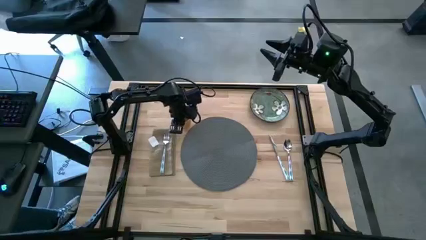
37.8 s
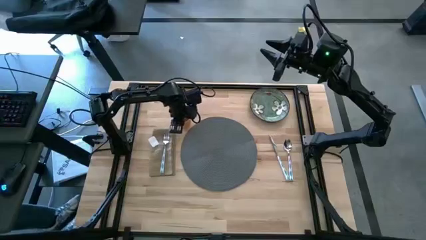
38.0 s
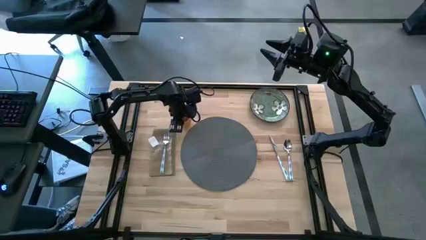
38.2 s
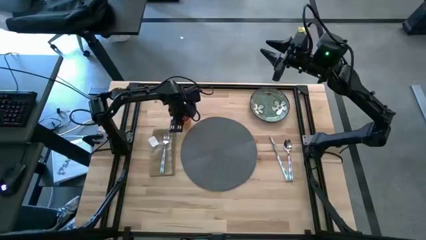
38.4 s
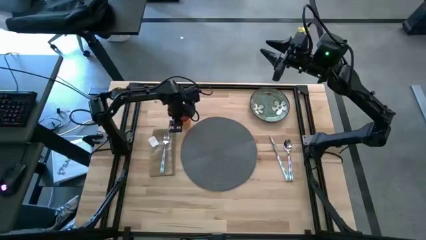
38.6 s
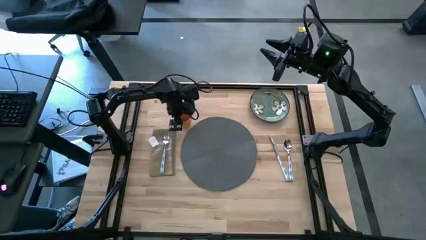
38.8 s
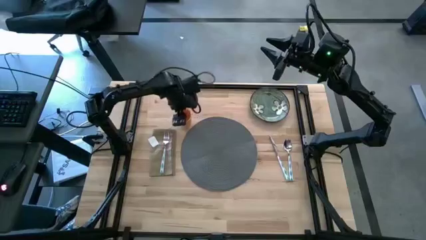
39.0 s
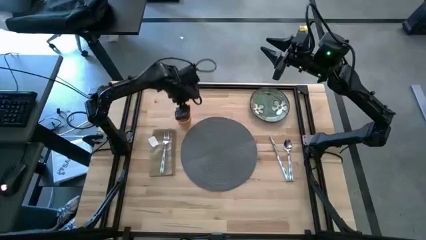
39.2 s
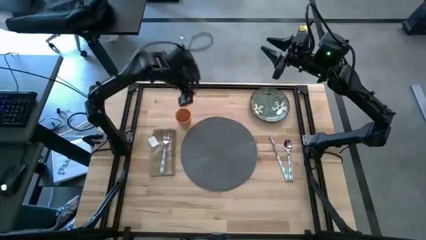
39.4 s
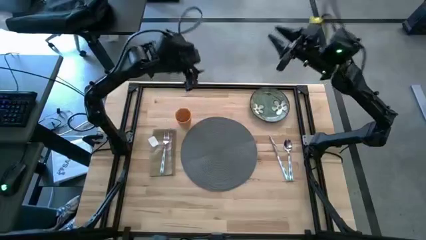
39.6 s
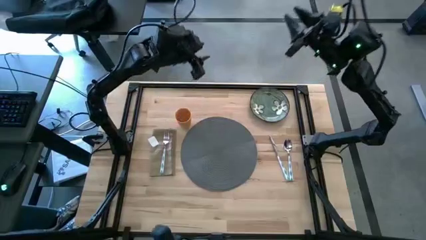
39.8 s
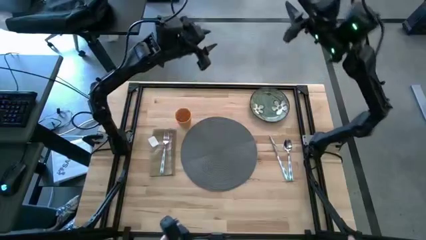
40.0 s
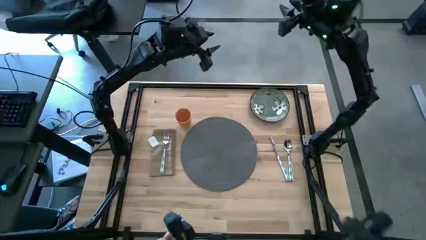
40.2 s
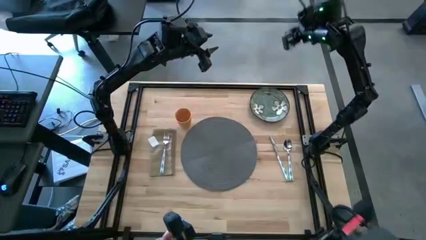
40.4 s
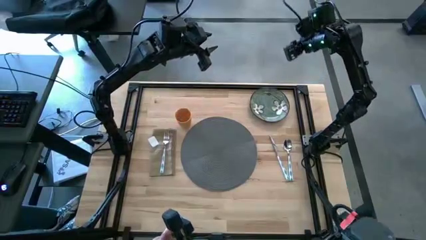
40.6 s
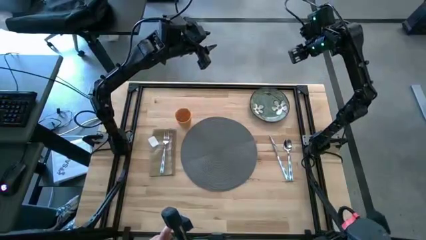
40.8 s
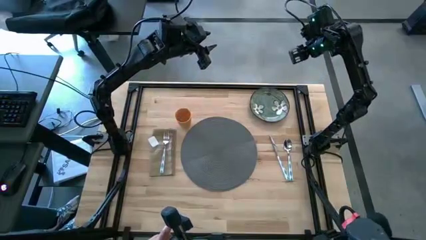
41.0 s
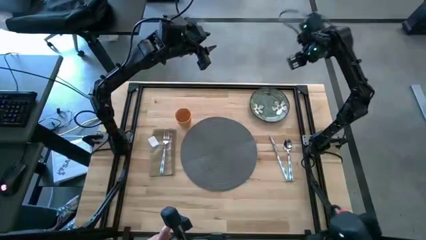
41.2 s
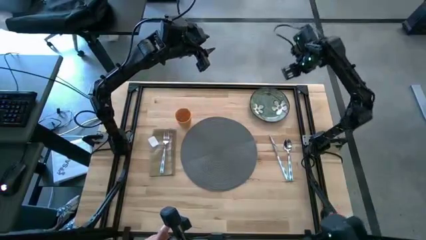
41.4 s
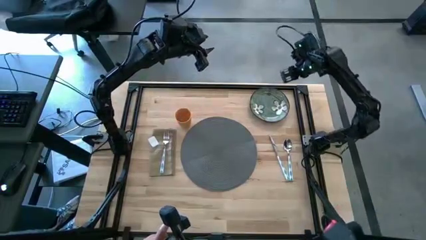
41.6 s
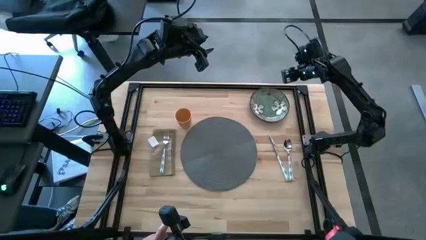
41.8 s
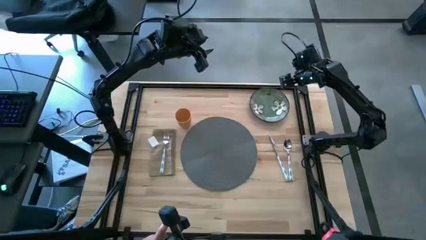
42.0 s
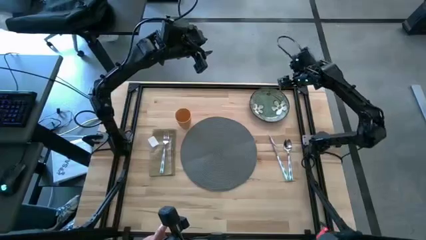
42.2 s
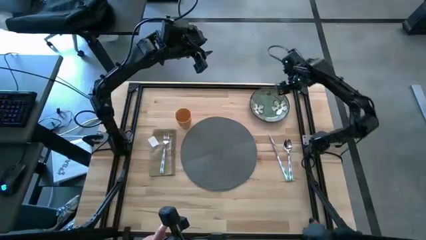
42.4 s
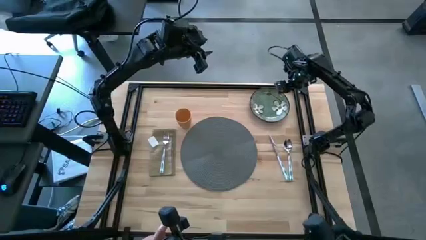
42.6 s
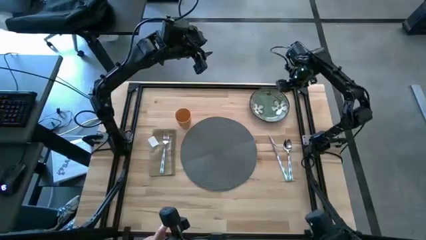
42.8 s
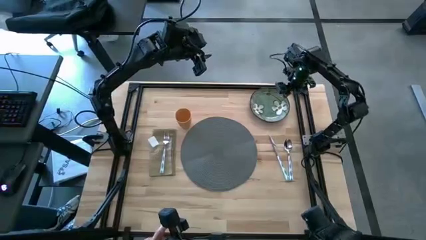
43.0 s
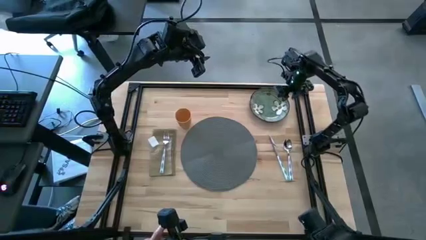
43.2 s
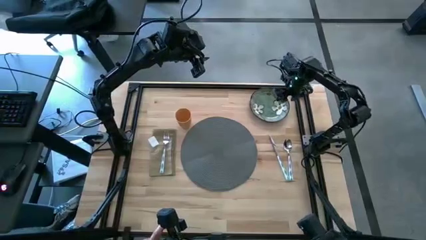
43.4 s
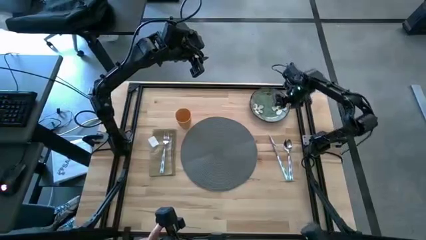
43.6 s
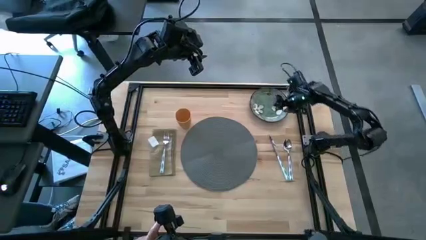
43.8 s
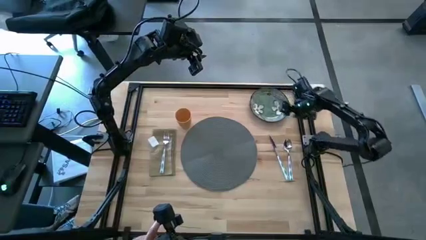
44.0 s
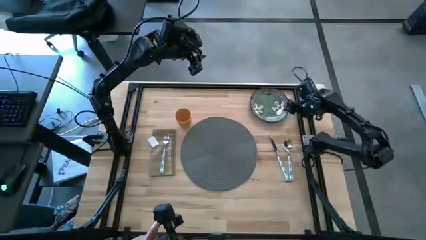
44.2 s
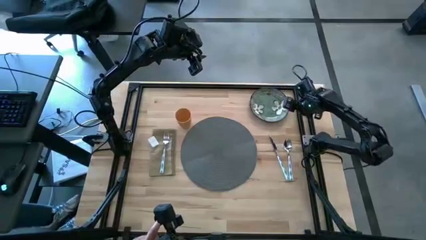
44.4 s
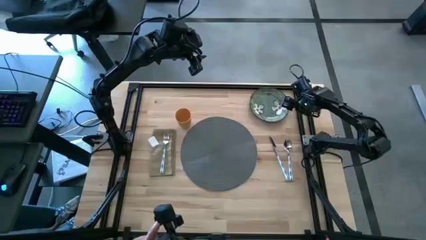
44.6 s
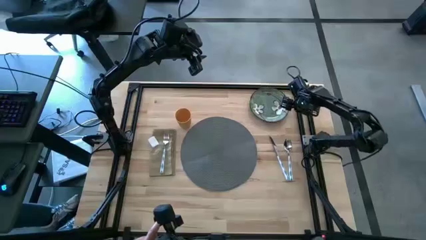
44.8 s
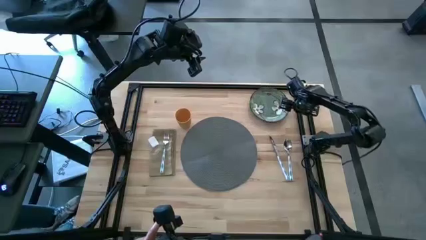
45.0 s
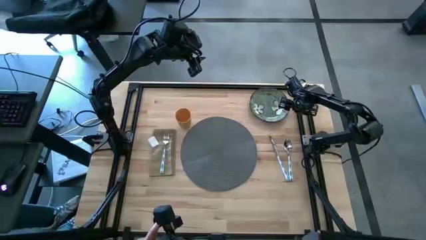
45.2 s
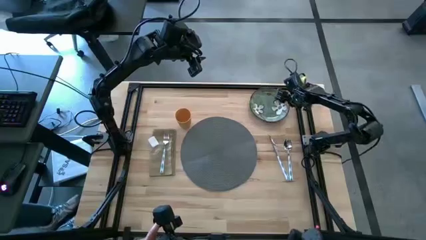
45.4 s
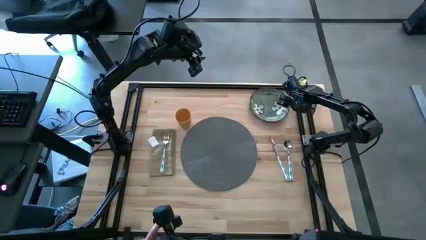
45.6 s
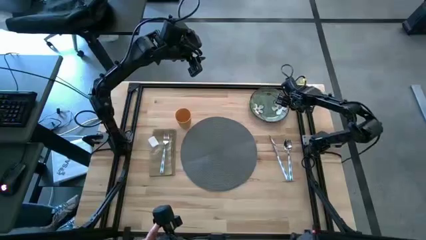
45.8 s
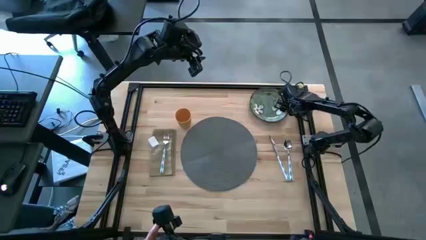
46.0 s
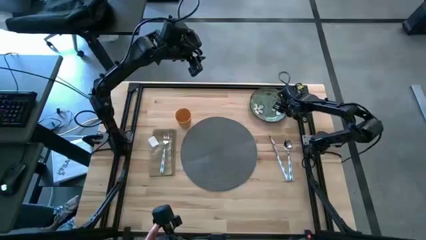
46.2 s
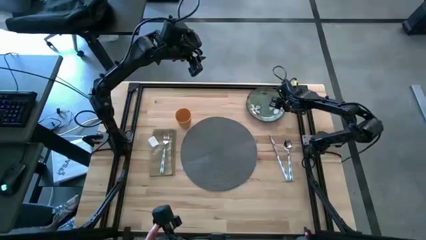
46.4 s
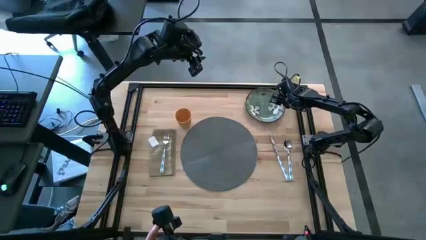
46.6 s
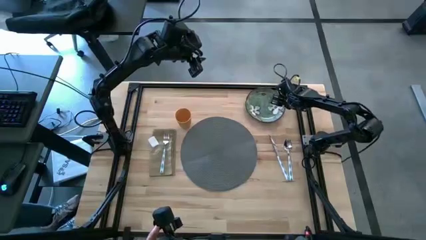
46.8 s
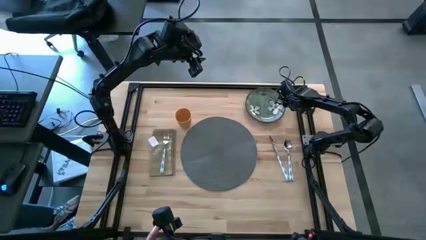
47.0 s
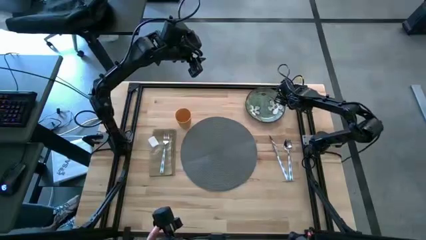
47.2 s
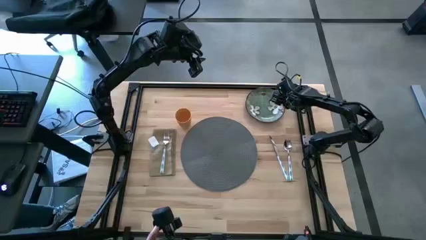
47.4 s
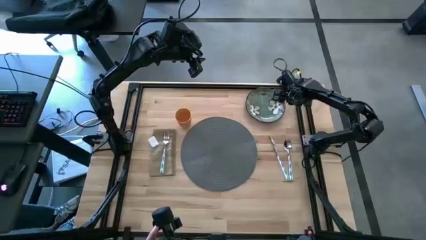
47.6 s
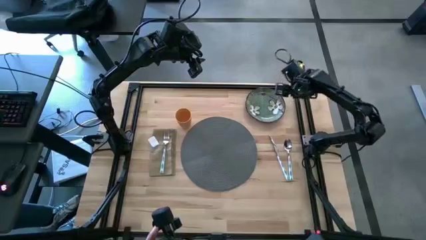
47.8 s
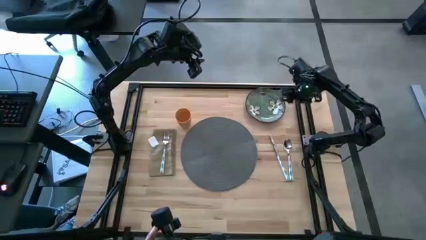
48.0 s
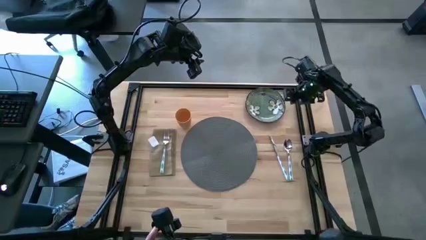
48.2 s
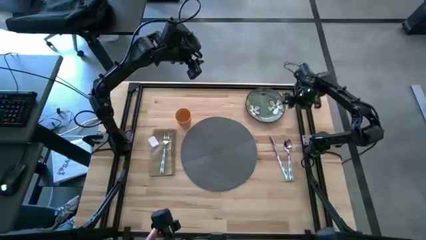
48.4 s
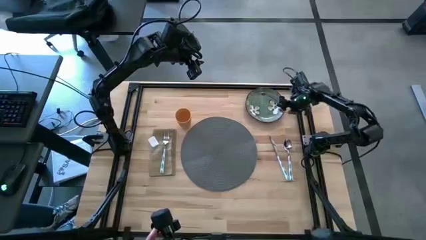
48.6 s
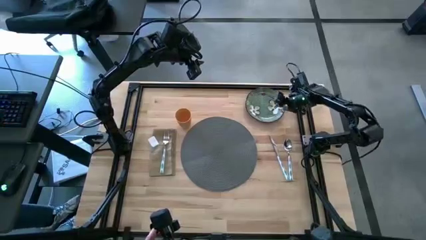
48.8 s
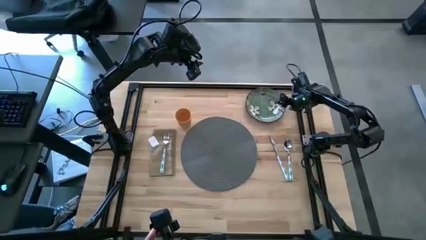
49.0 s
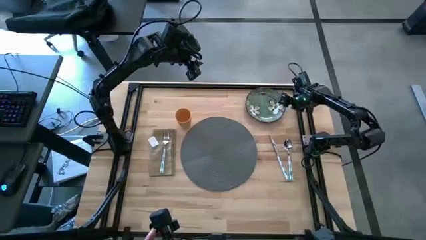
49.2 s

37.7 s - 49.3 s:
Task: Set table place
Put the green plate on the gray table mat

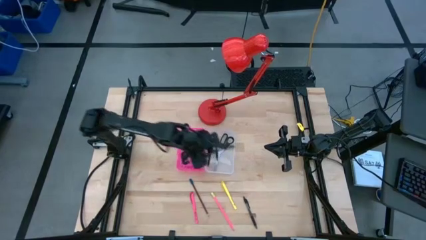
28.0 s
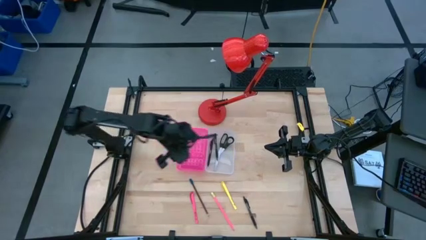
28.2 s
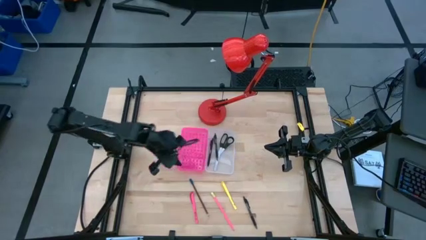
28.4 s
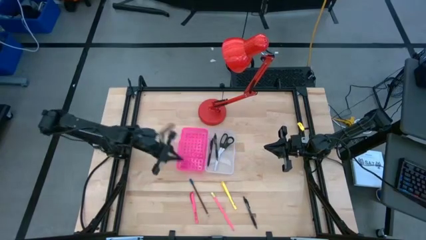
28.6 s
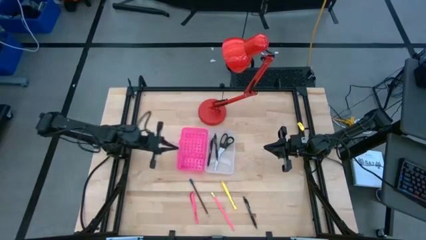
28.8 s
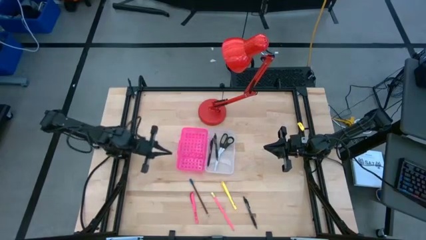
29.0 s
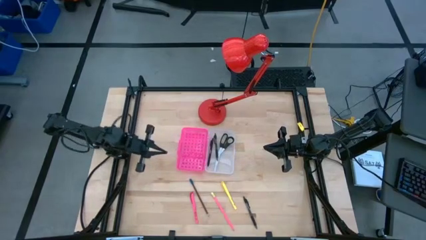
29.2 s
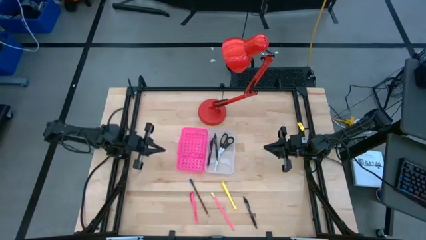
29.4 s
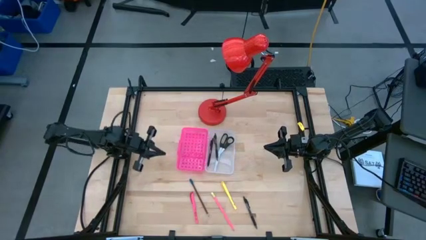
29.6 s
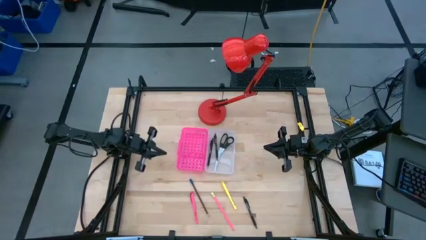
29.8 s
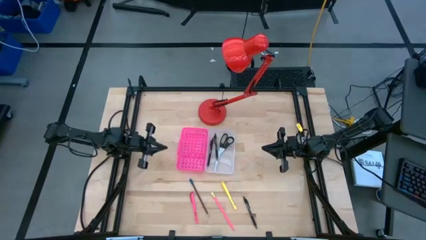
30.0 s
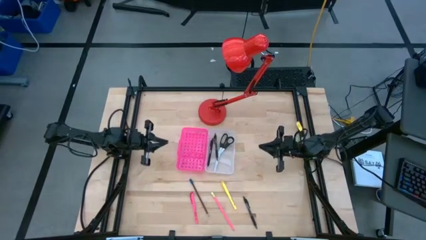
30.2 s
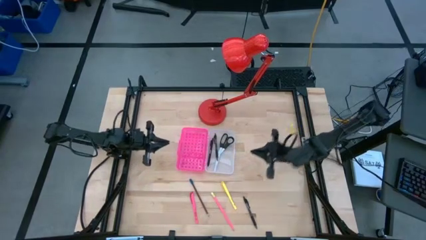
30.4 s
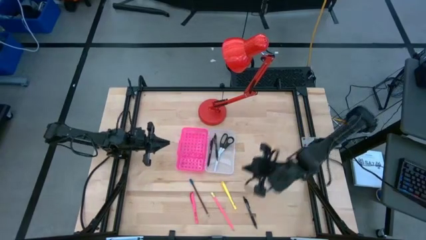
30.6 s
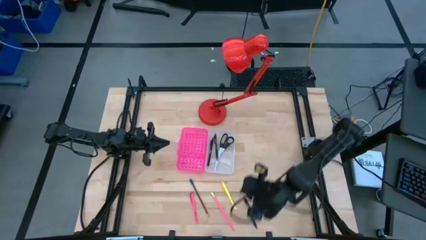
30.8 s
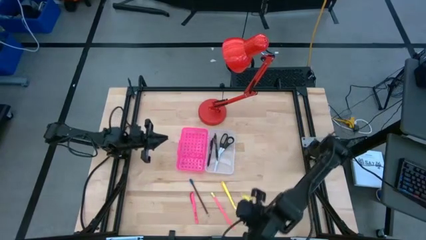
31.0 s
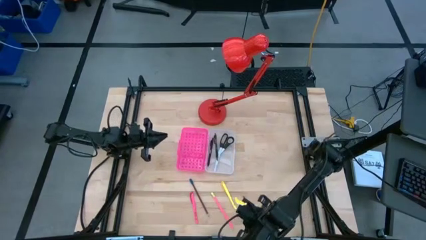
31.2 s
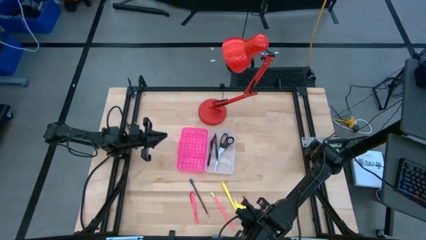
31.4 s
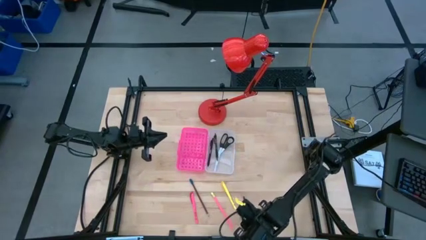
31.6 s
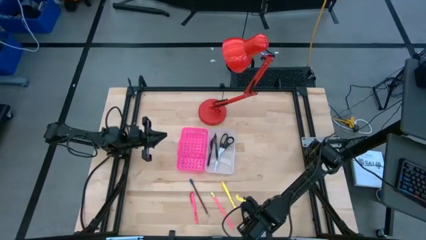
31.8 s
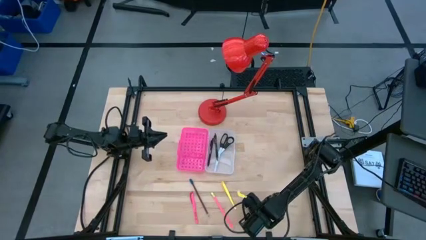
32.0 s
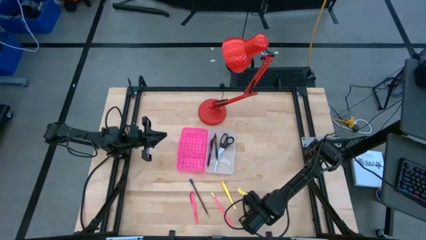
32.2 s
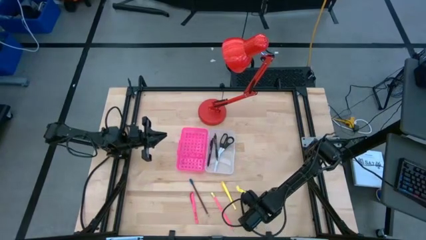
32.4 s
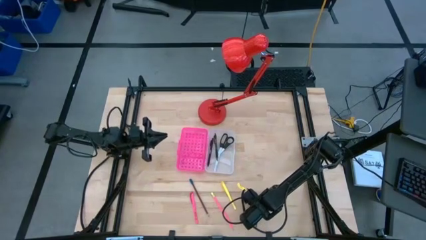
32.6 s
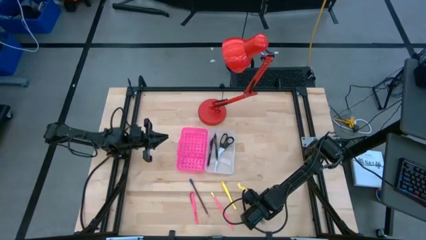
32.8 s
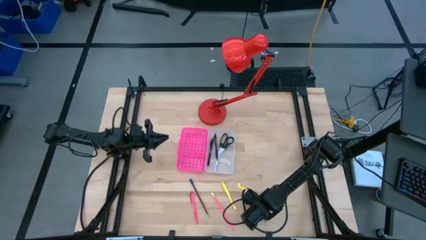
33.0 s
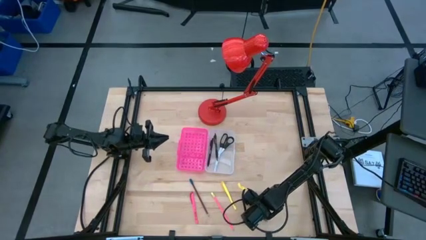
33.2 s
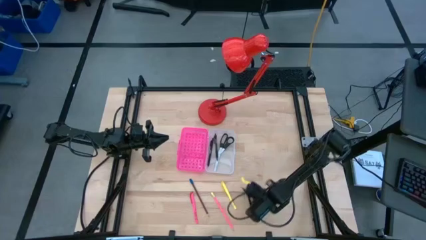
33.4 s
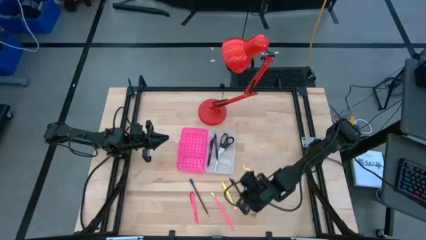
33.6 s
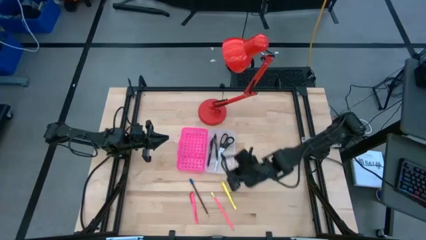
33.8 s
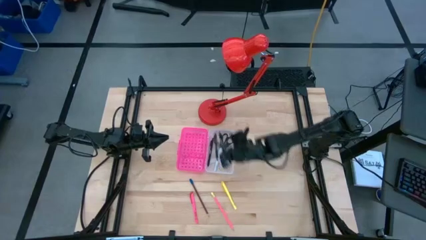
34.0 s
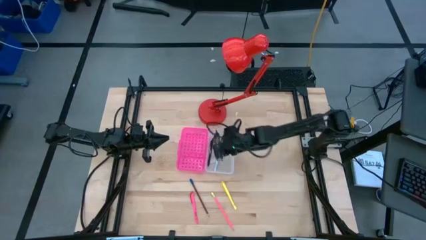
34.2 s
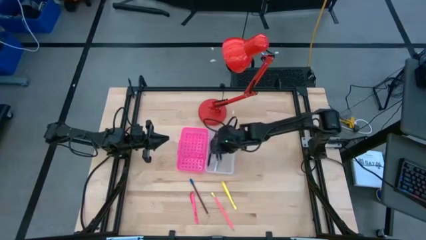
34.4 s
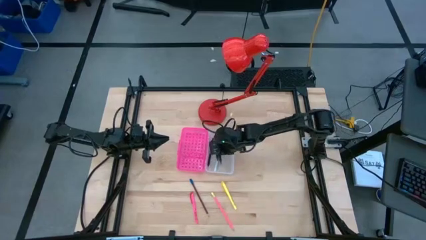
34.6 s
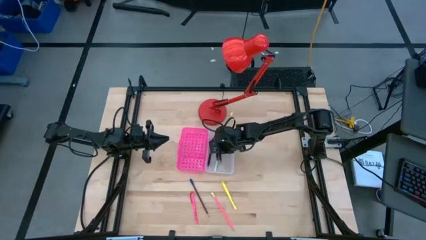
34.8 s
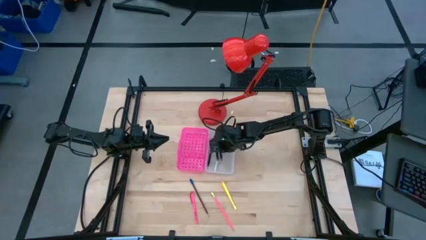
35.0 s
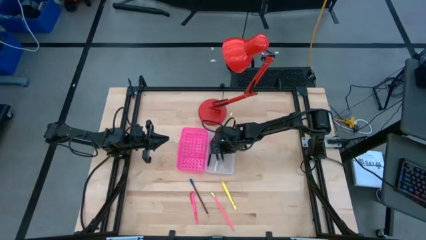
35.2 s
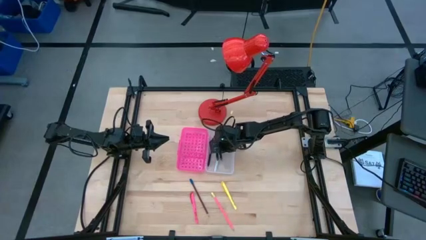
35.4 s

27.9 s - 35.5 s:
Task: Pick & place school supplies into a supply box
Put the black pen into the supply box
